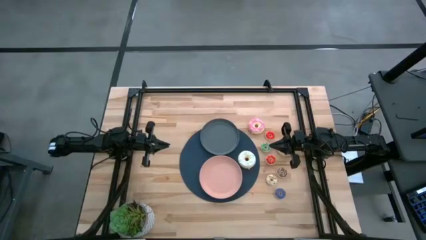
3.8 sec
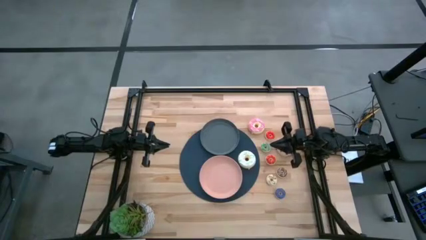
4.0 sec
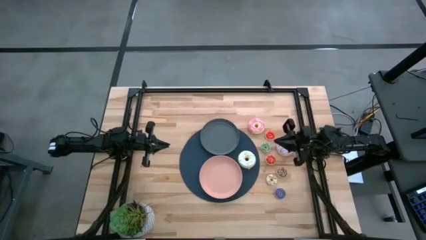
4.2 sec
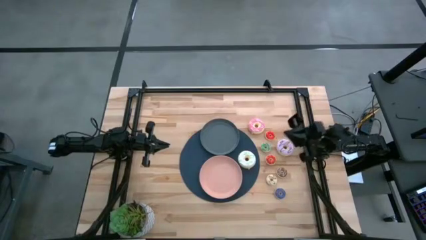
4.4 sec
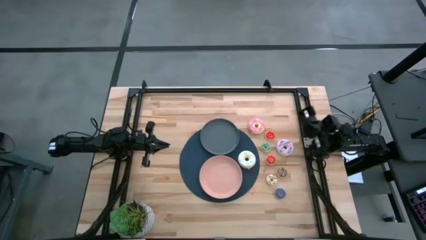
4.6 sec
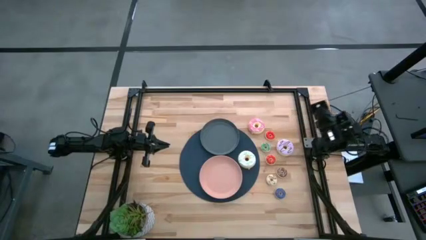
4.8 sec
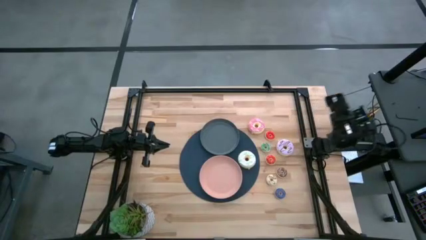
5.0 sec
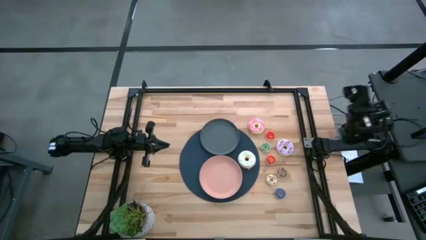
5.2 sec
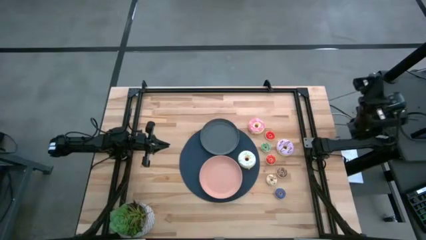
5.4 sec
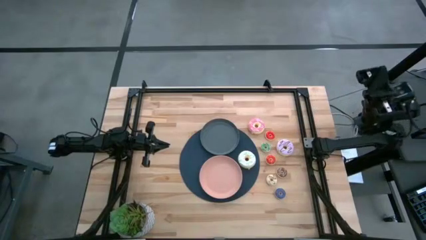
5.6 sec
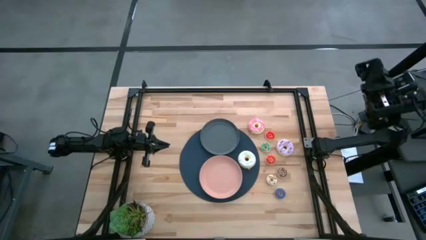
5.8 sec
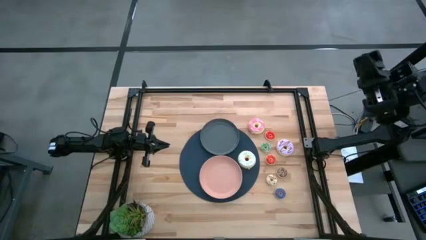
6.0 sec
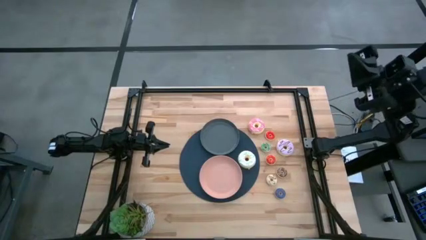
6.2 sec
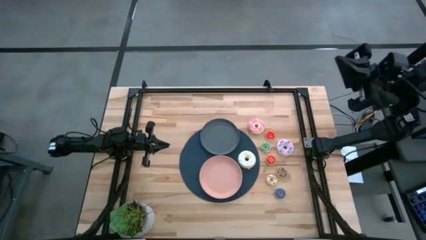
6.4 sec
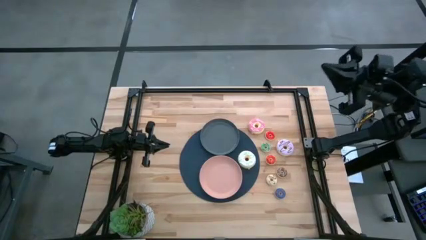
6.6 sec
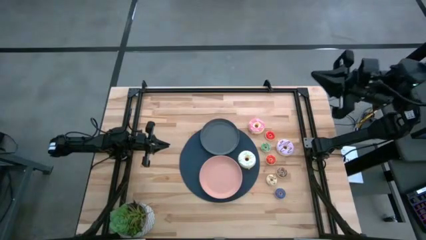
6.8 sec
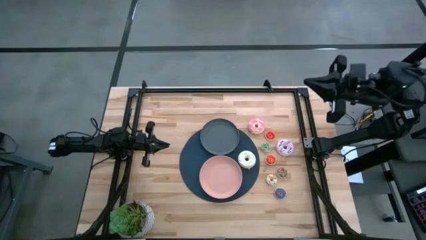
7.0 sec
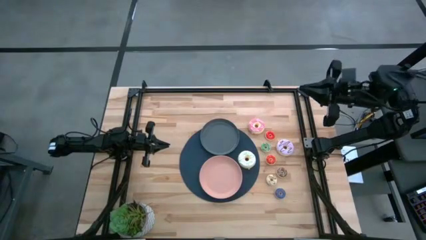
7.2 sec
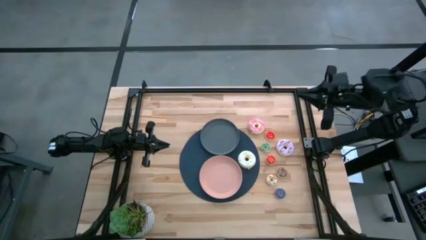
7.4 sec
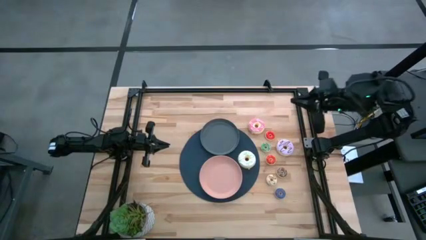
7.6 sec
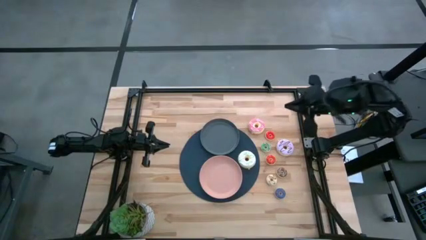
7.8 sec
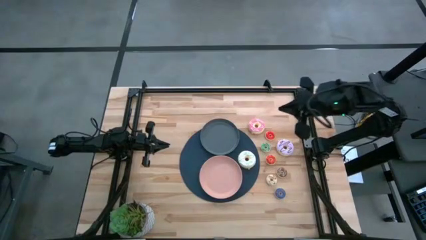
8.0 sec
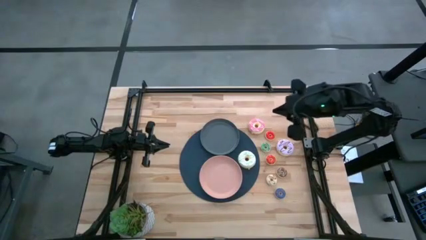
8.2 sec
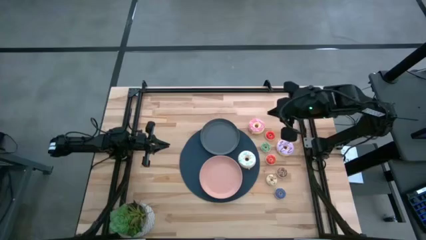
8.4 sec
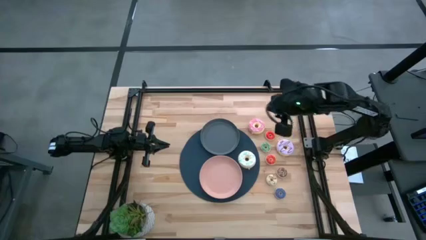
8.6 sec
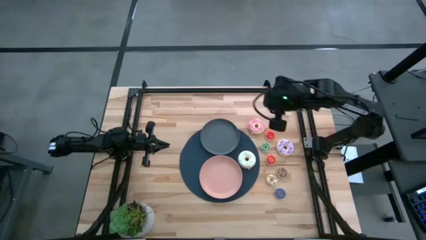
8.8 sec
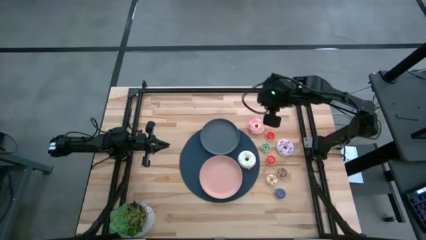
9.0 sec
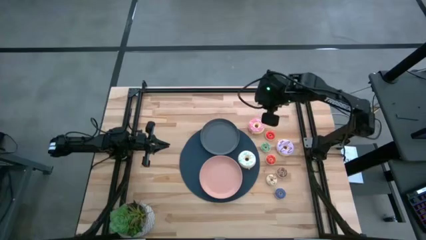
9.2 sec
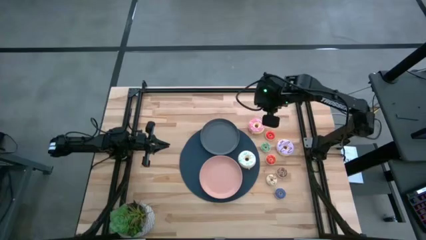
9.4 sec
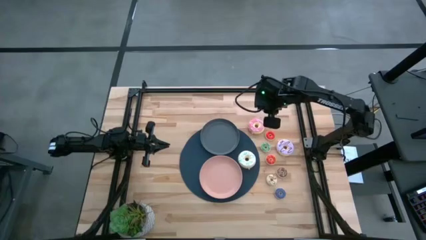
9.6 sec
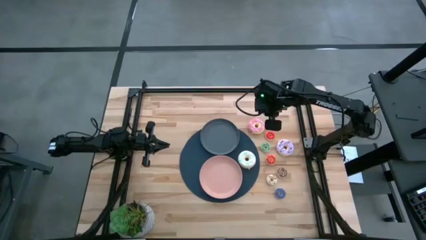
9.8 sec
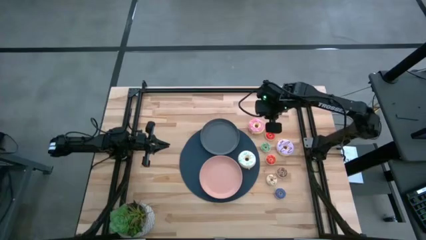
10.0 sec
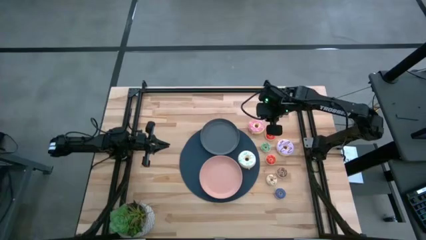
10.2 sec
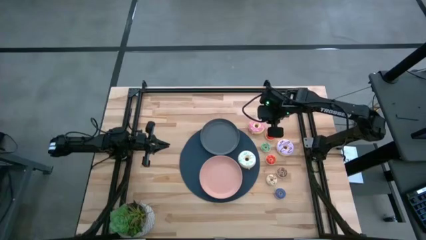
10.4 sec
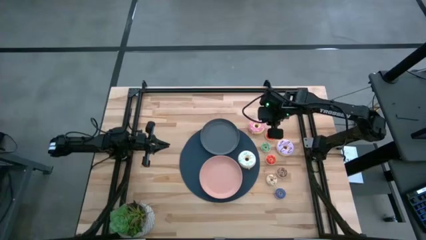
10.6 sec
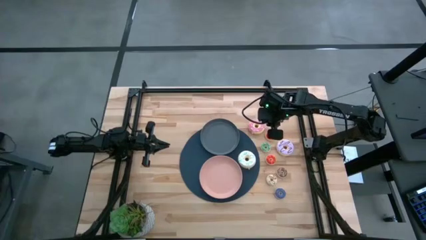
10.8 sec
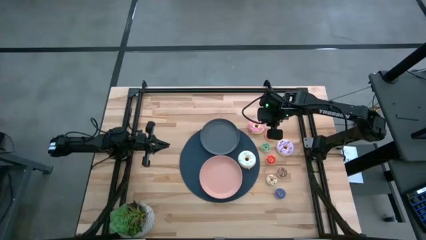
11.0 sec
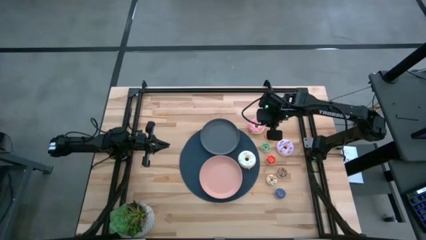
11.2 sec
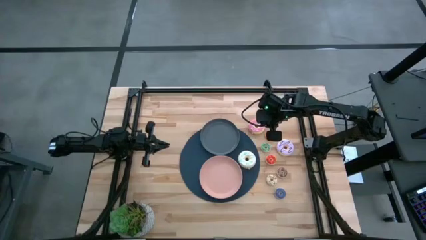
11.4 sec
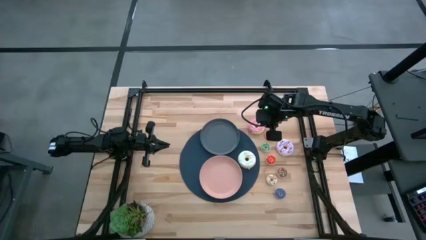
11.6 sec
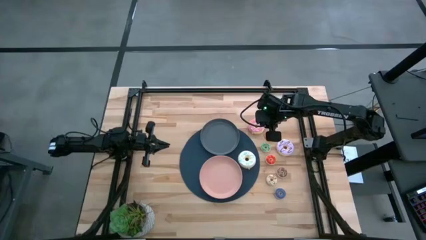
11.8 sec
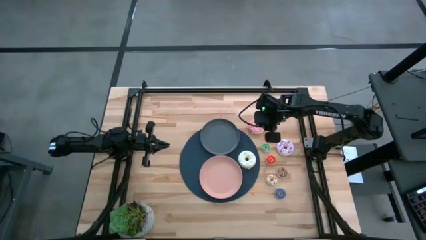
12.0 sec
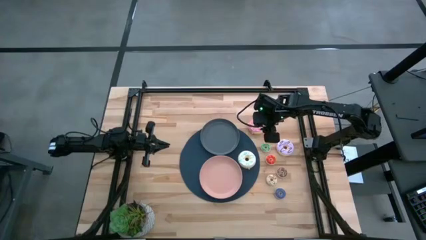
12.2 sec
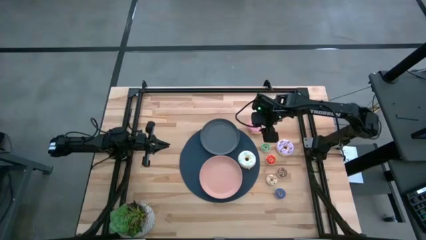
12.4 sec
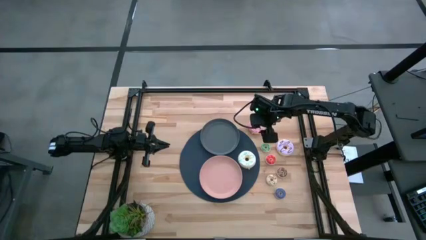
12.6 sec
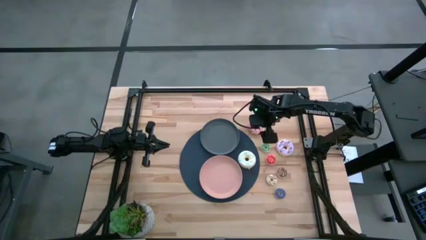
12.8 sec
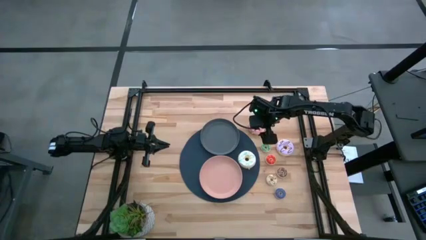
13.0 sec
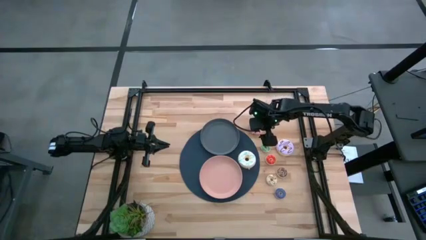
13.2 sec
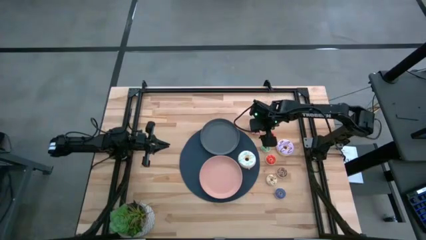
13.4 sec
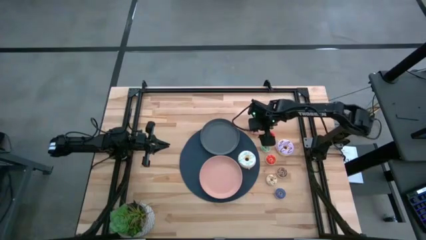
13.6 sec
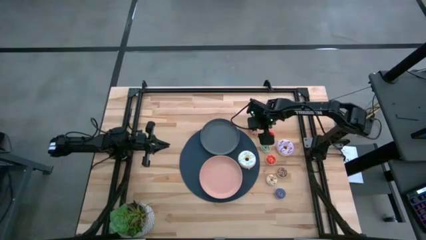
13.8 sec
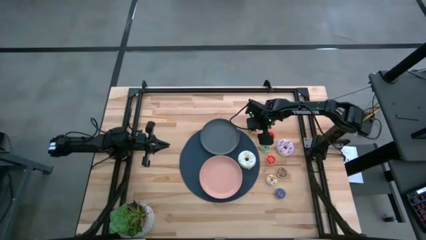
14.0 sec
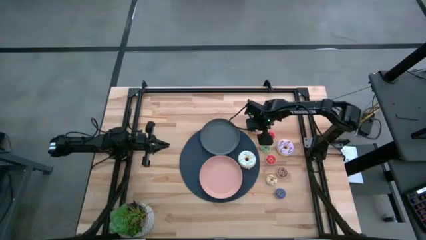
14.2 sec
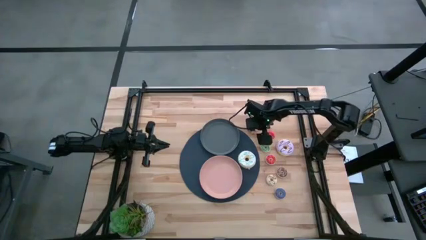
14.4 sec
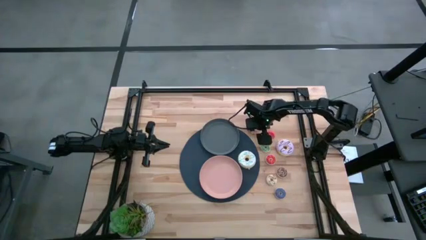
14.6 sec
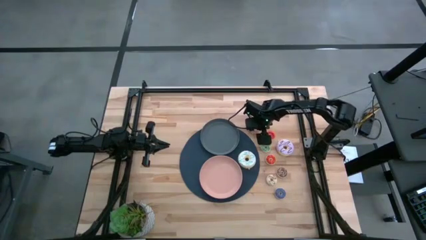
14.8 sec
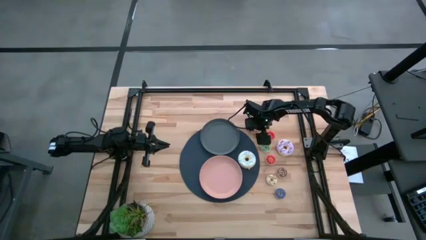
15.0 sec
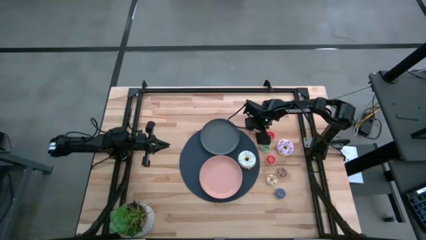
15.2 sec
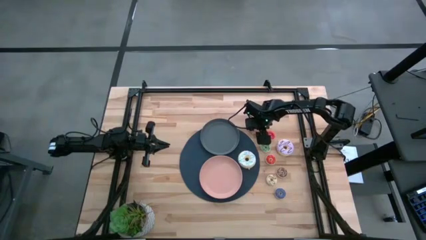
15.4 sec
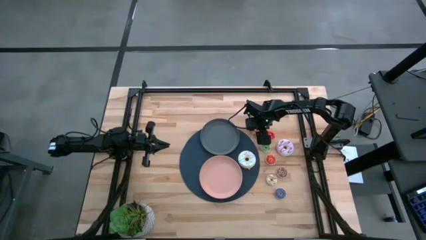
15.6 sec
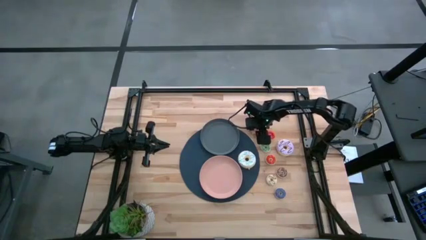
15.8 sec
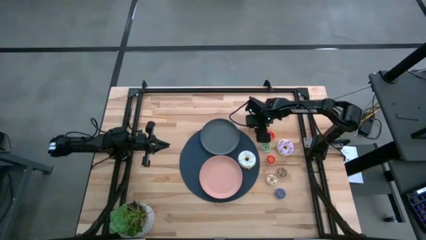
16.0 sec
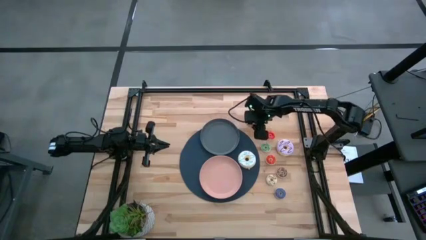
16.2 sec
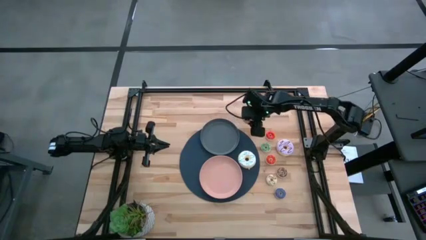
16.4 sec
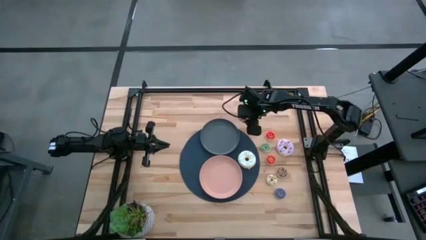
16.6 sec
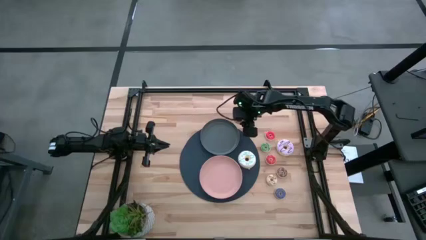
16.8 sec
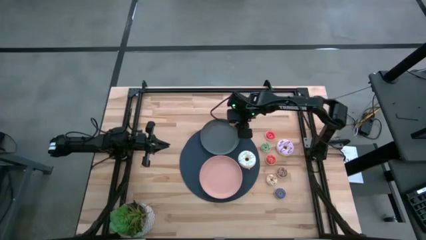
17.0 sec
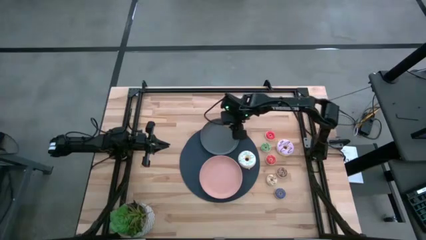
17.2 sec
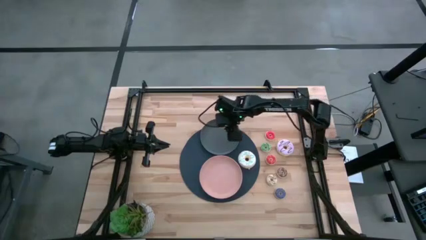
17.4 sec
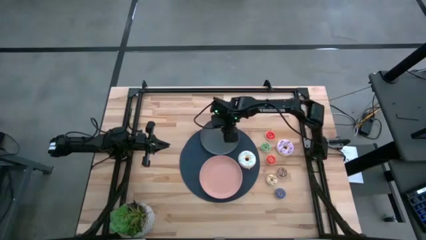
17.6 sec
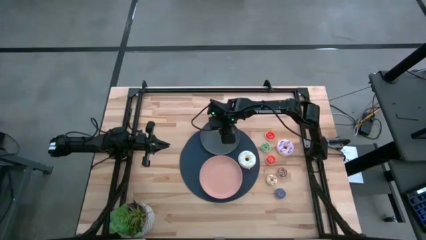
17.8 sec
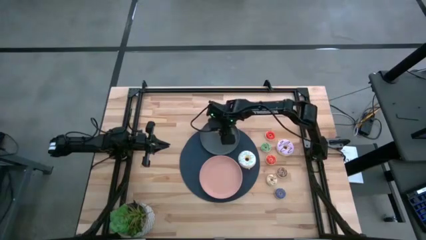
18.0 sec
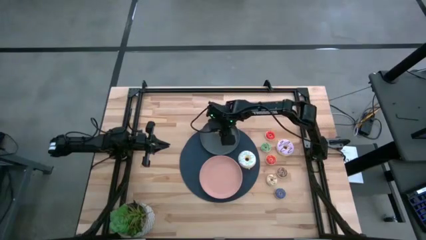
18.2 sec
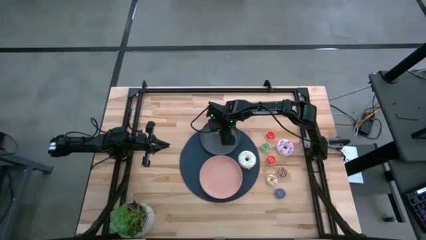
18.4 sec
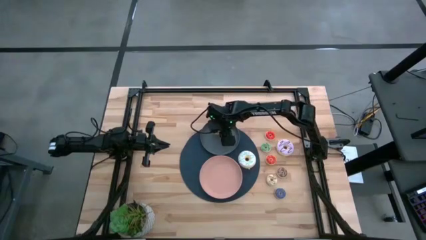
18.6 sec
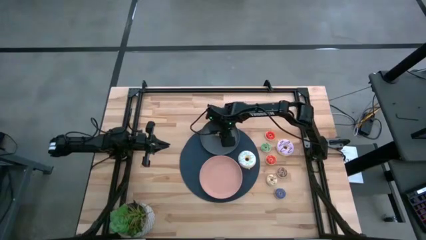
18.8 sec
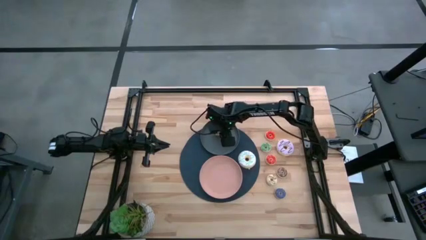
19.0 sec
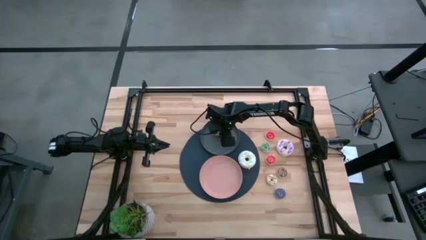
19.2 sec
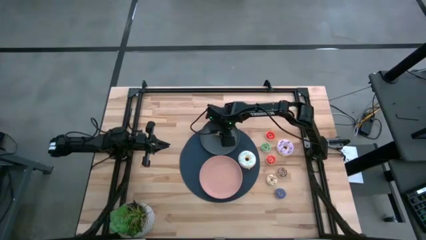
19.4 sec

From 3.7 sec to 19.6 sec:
Task: Pick & Place donuts
Put the big pink doughnut into the gray plate
